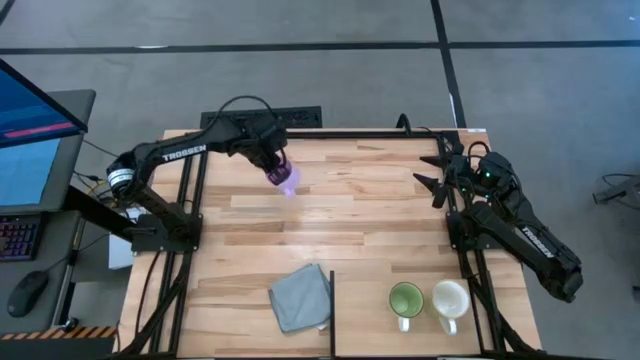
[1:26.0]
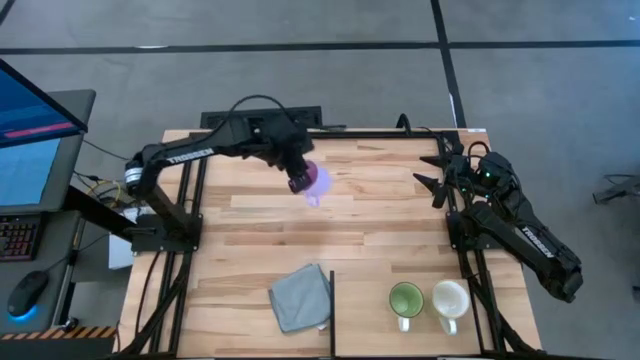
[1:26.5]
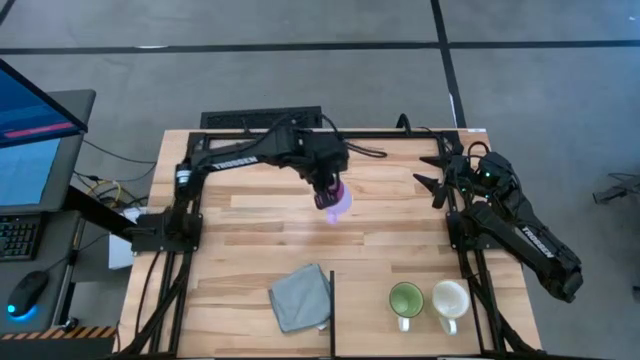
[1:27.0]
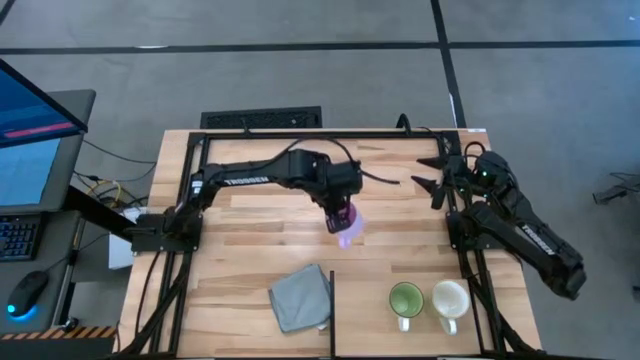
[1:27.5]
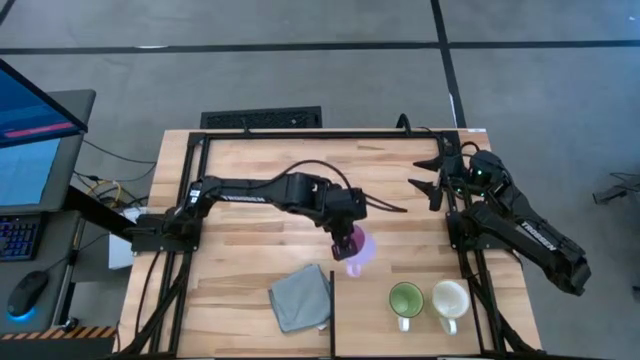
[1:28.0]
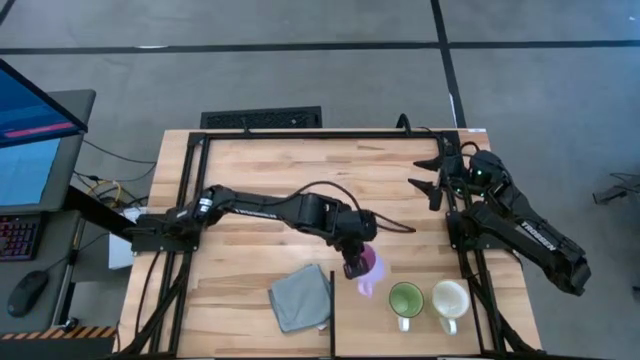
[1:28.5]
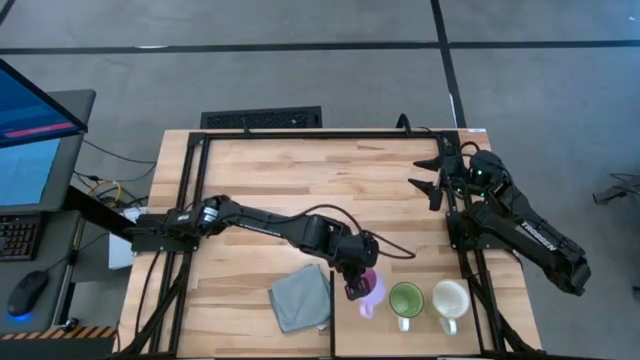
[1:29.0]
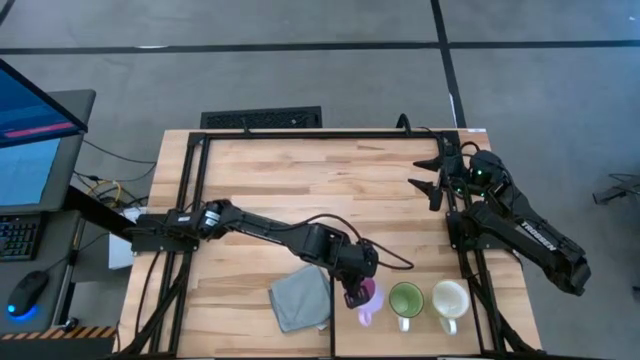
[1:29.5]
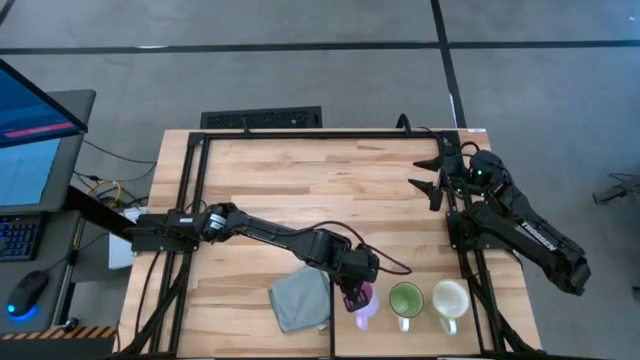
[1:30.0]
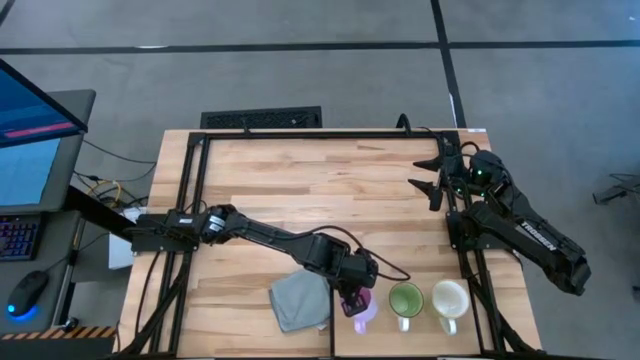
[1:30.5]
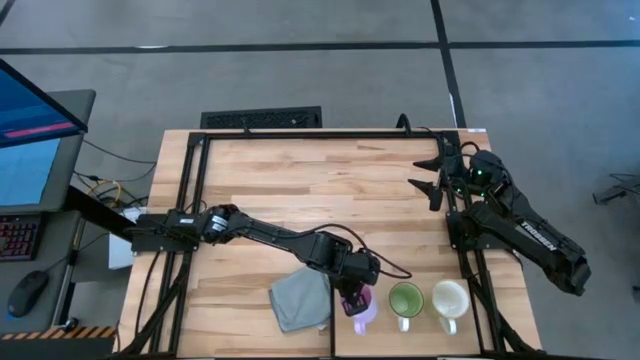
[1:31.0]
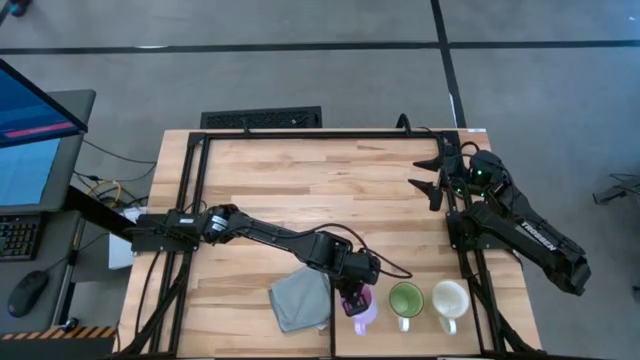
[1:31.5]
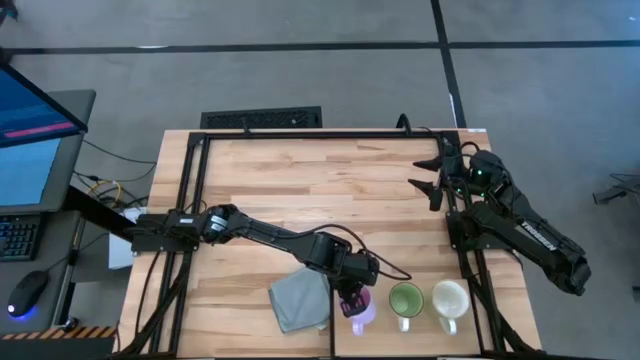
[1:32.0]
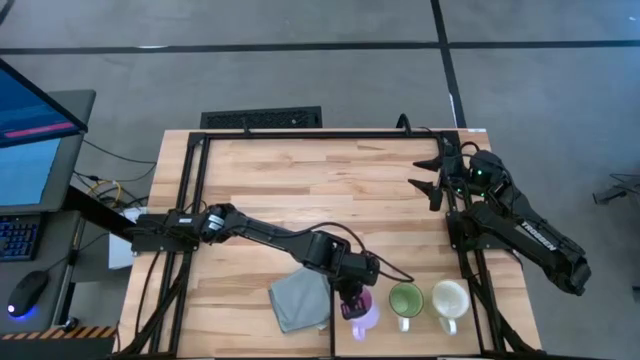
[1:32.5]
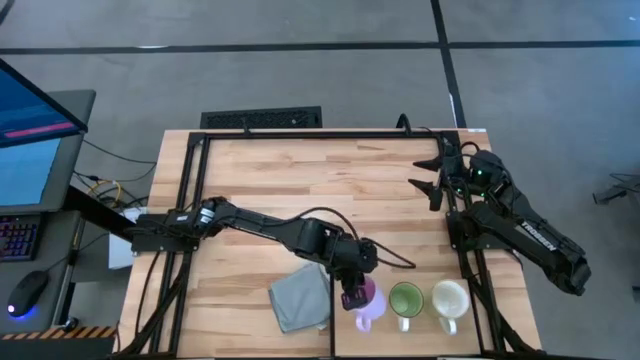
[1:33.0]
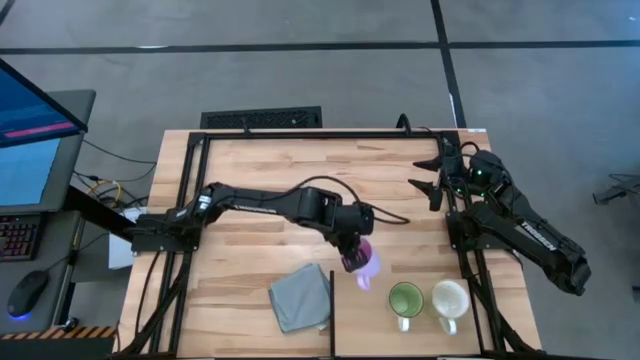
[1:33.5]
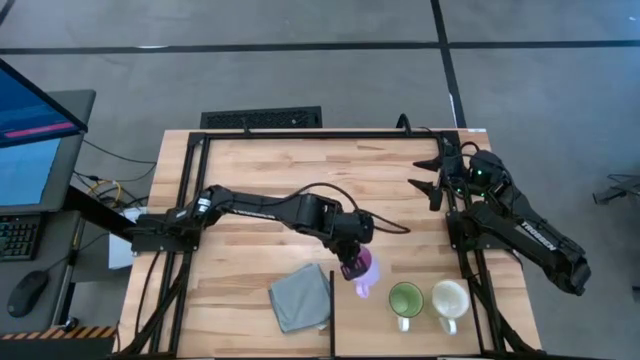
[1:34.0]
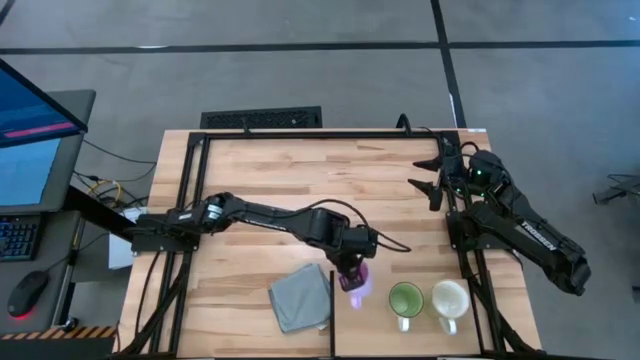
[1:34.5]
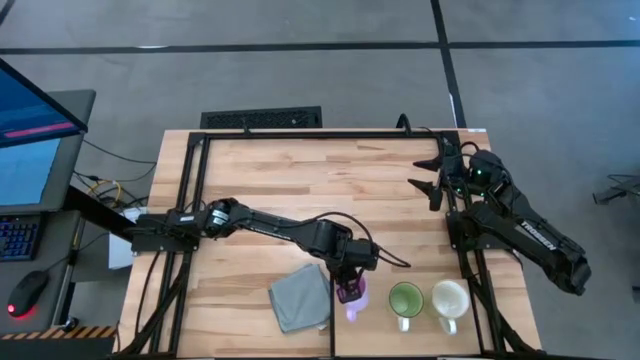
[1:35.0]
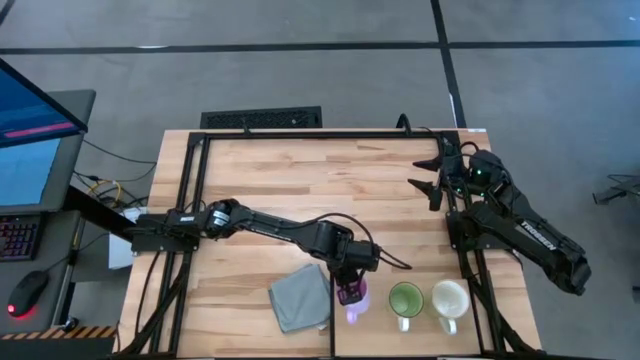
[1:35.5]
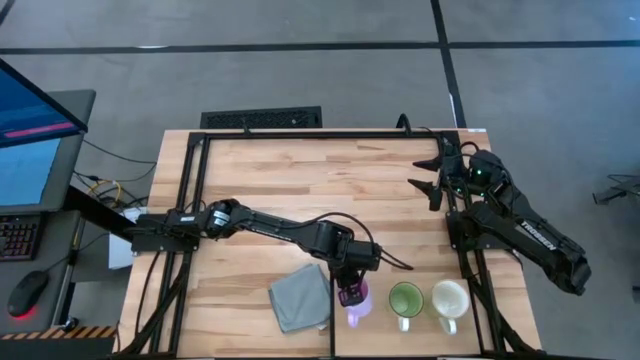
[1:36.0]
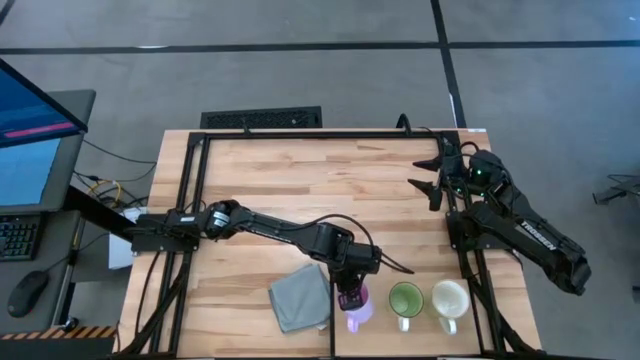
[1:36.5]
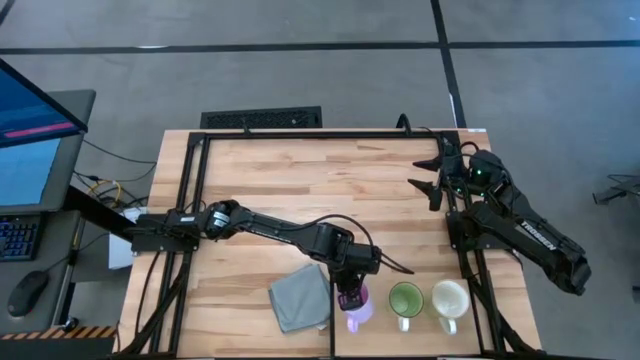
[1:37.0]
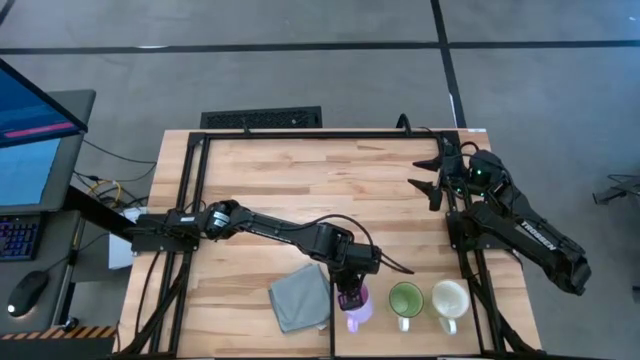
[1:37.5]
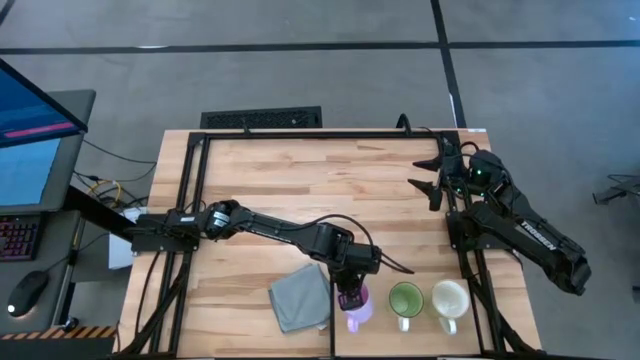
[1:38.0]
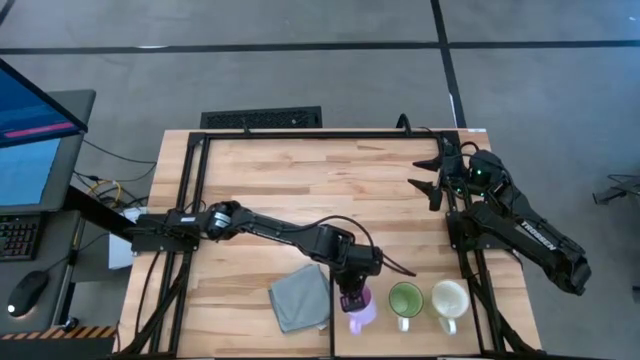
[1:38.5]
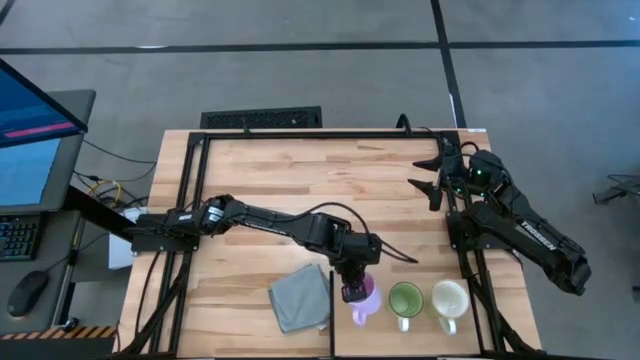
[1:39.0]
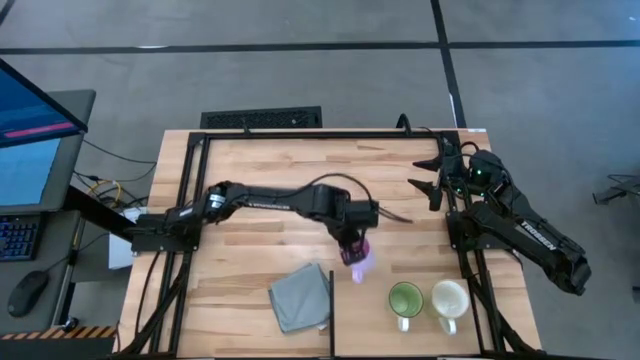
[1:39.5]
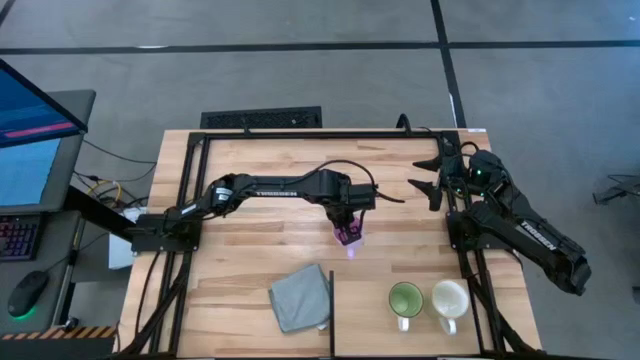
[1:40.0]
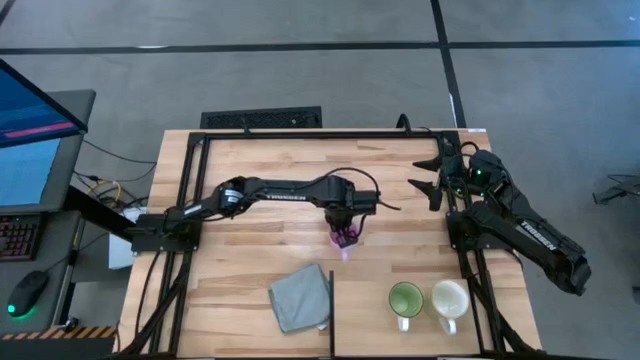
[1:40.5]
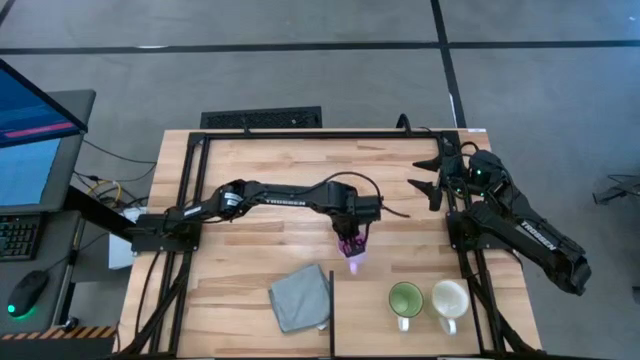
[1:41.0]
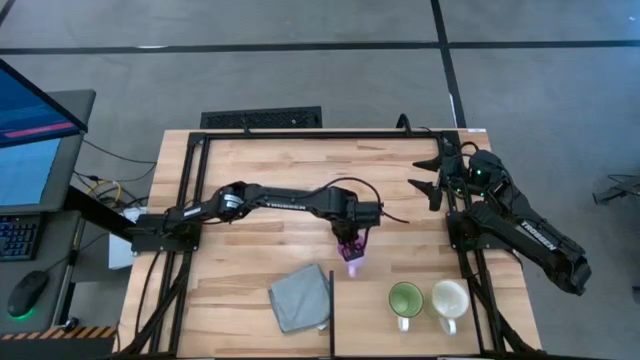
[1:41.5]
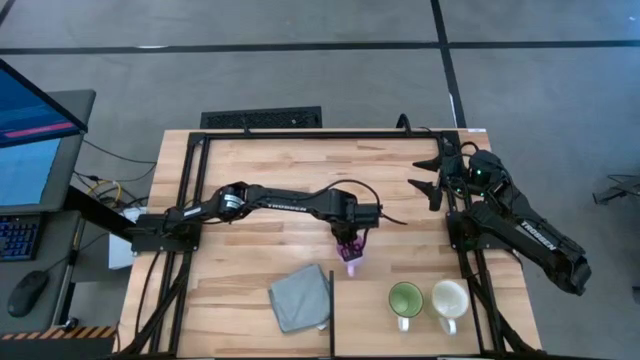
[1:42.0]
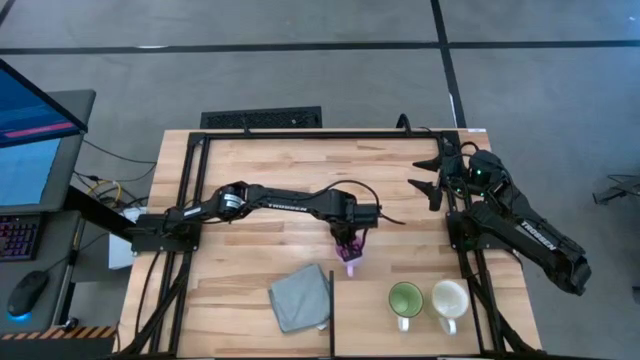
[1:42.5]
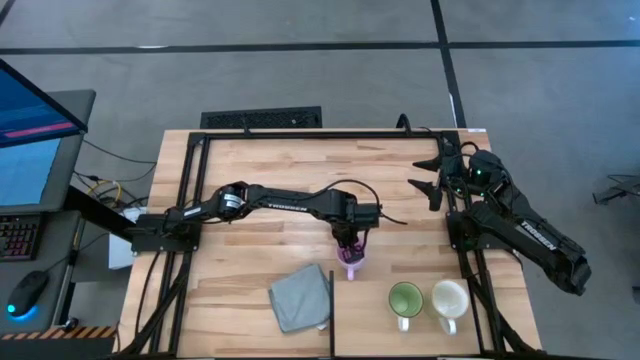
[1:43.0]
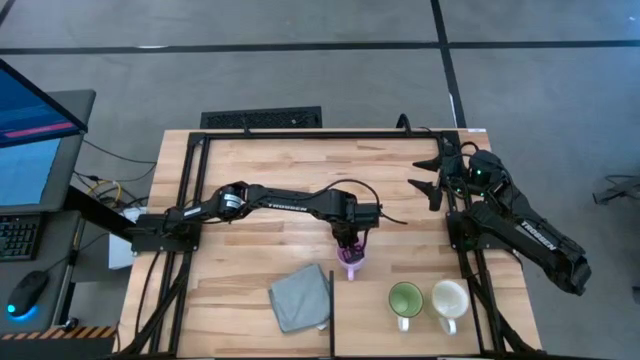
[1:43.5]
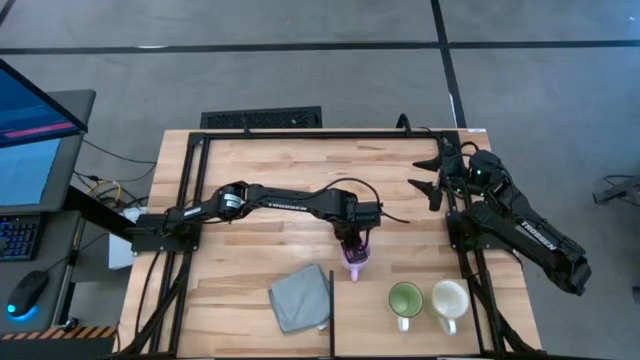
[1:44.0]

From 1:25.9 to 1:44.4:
Task: Stack small to large cups/mugs on shelf
Put the pink mug on the shelf

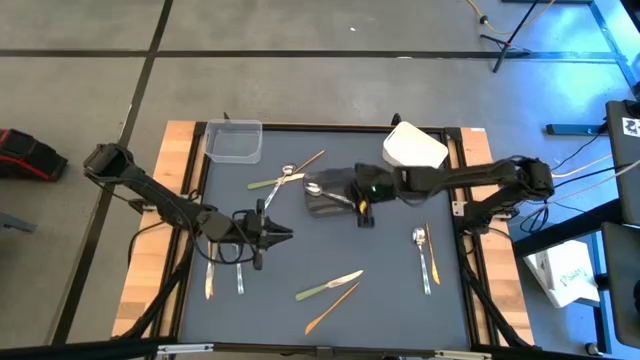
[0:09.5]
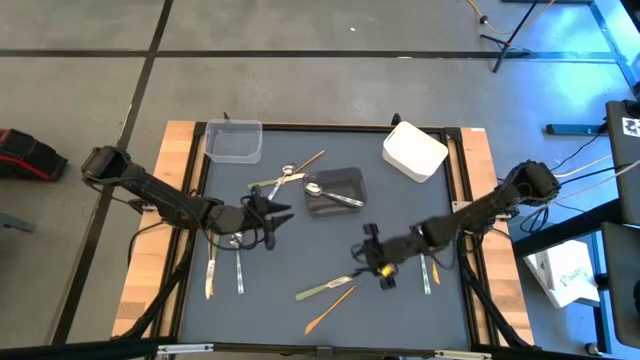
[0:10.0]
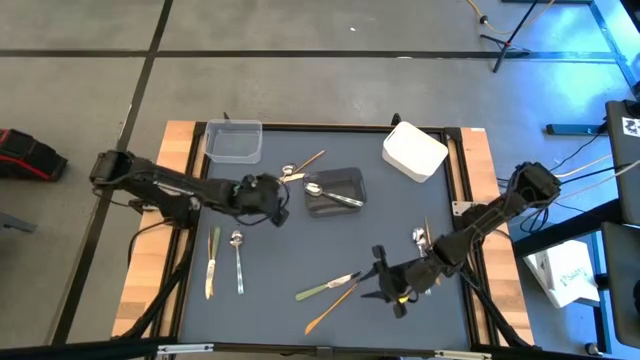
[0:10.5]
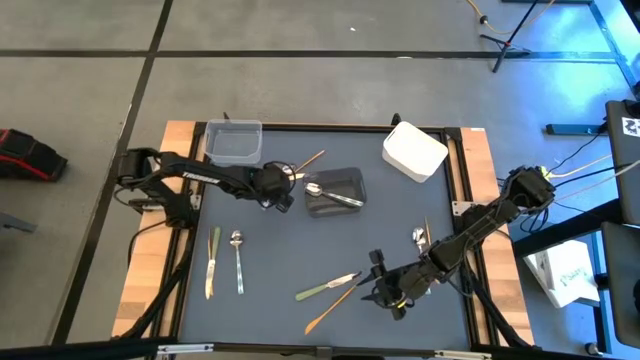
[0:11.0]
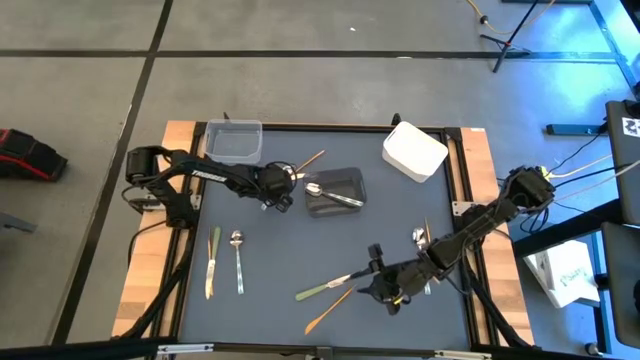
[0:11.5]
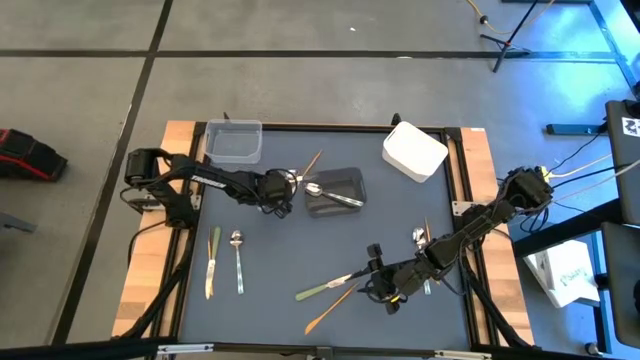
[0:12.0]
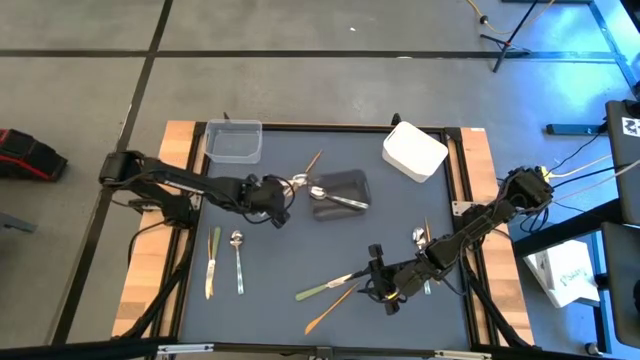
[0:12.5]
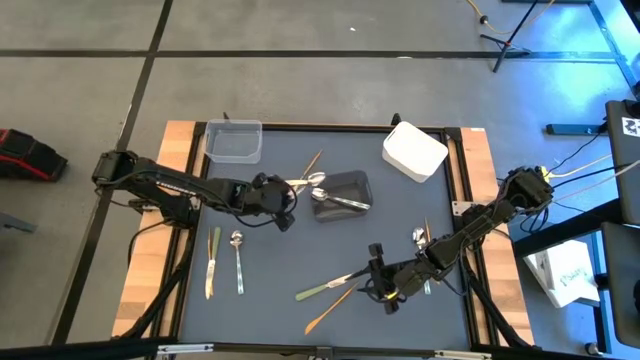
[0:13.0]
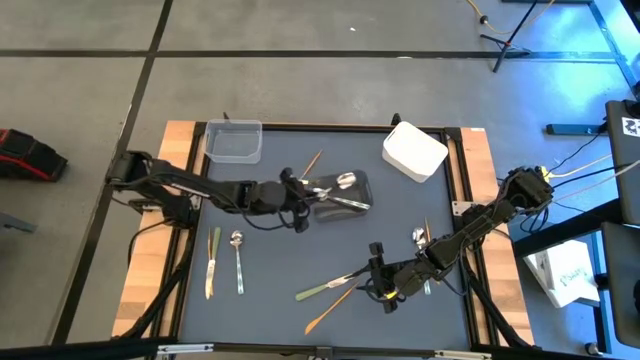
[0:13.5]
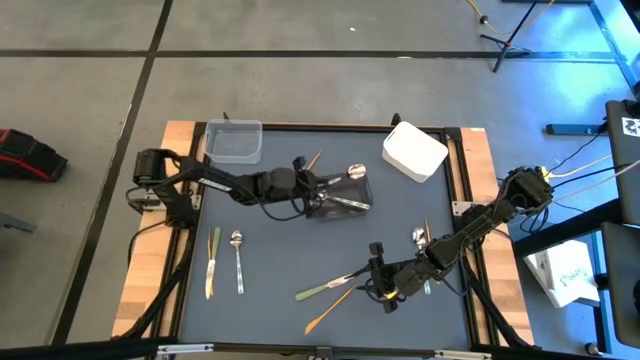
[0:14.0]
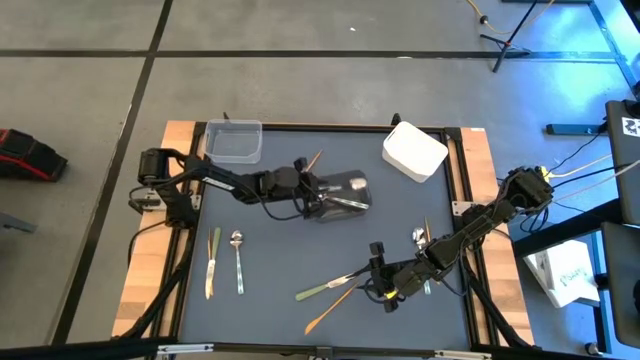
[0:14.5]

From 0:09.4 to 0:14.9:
Task: Sort silverware by color (type)
Put the top blue spoon into the black bin
